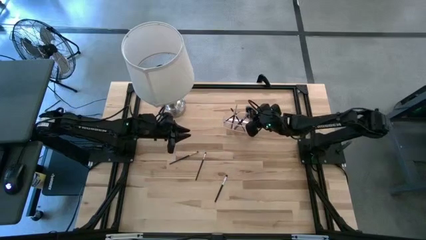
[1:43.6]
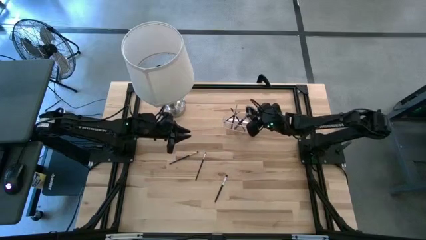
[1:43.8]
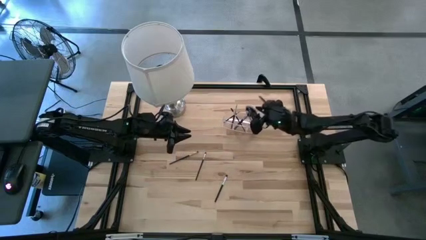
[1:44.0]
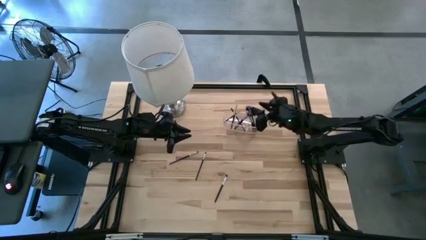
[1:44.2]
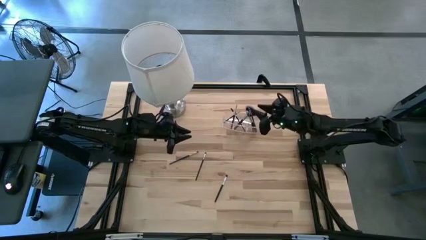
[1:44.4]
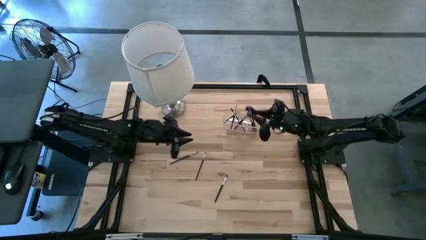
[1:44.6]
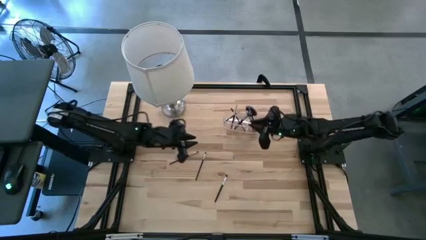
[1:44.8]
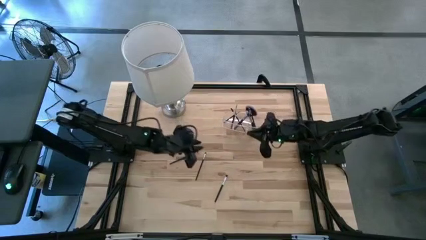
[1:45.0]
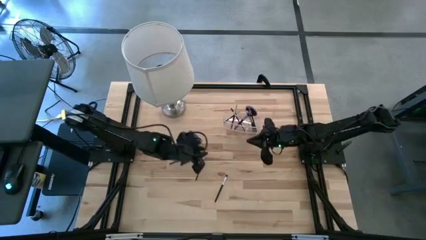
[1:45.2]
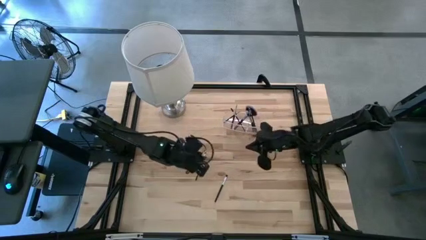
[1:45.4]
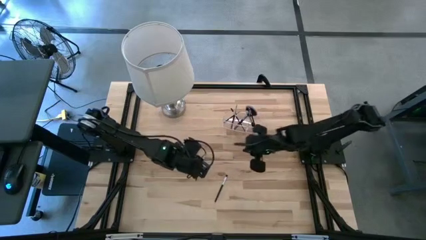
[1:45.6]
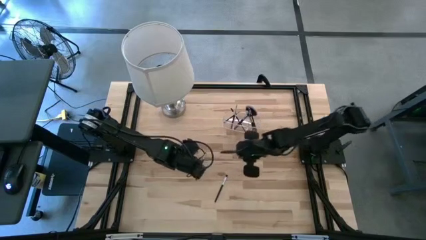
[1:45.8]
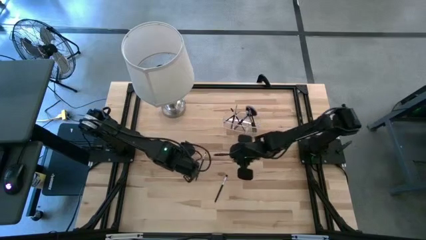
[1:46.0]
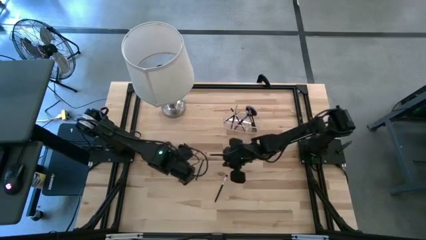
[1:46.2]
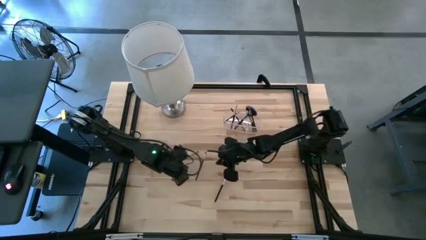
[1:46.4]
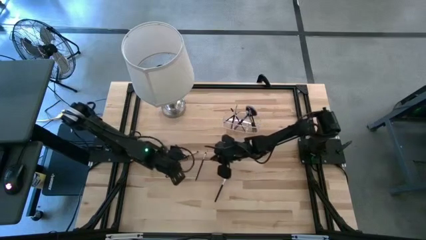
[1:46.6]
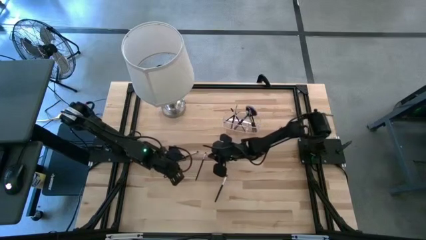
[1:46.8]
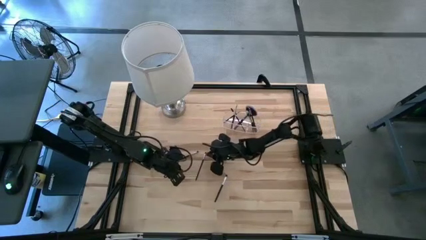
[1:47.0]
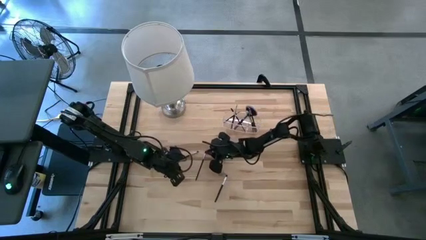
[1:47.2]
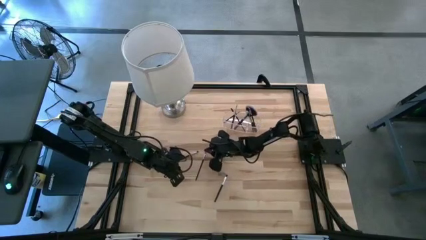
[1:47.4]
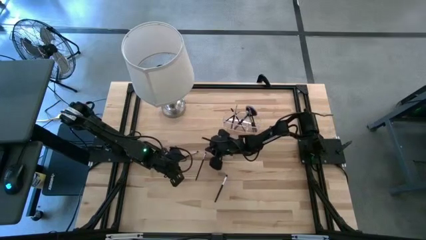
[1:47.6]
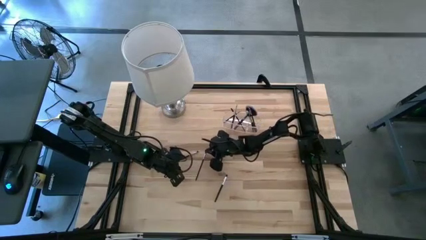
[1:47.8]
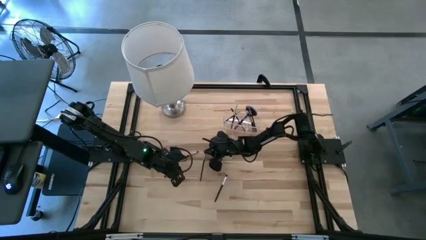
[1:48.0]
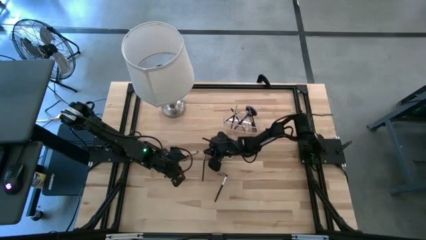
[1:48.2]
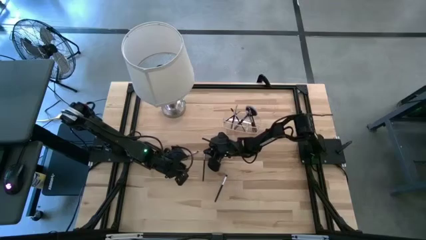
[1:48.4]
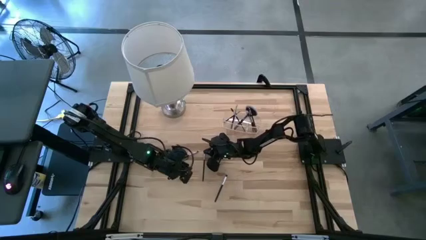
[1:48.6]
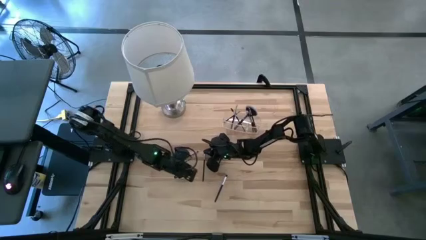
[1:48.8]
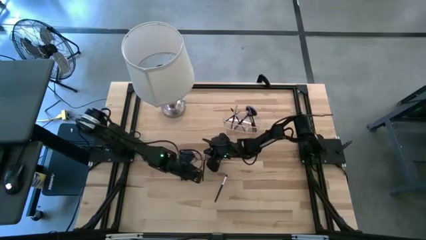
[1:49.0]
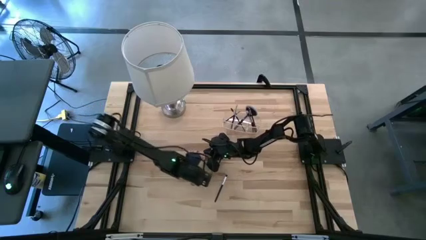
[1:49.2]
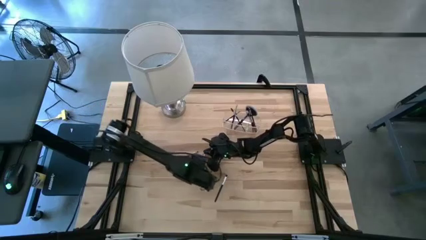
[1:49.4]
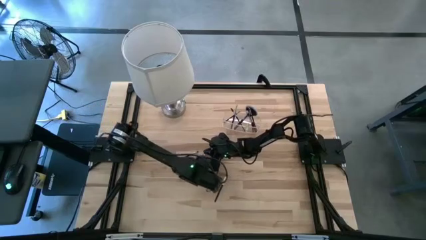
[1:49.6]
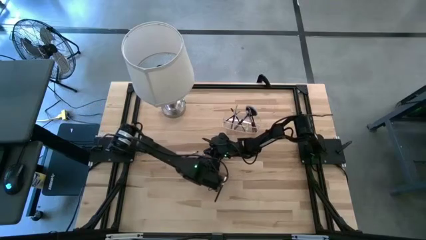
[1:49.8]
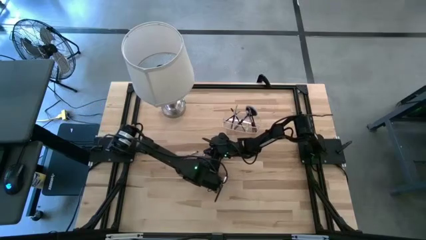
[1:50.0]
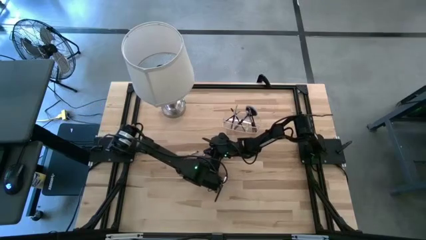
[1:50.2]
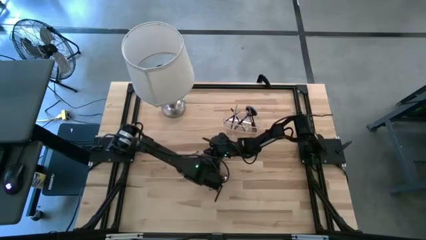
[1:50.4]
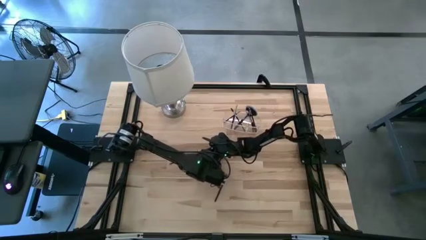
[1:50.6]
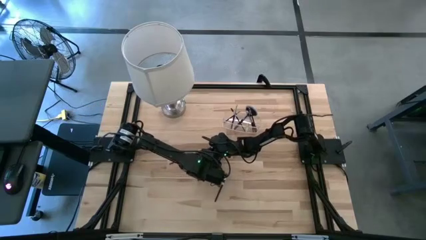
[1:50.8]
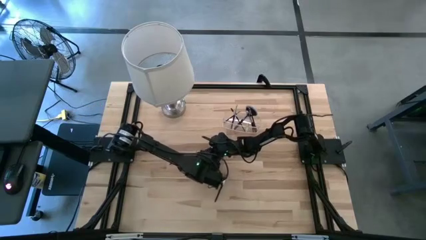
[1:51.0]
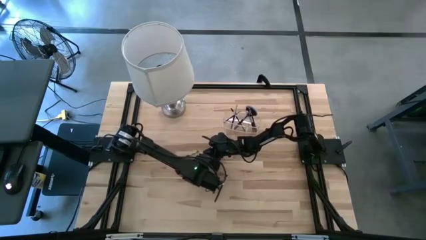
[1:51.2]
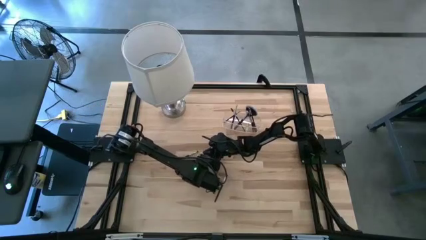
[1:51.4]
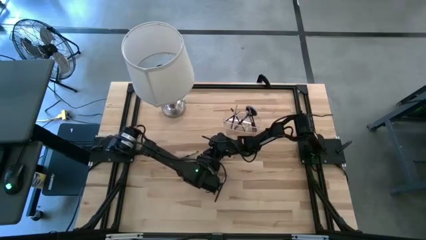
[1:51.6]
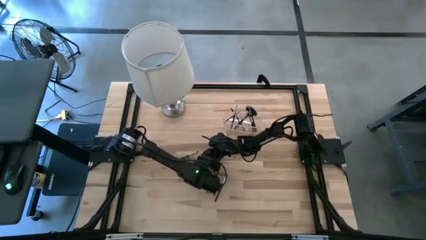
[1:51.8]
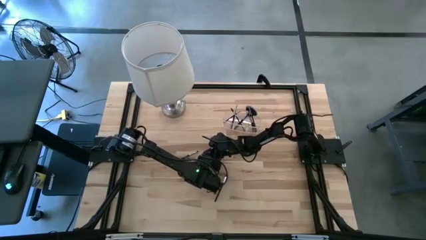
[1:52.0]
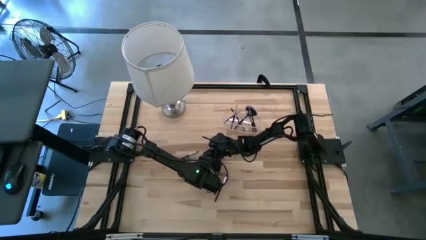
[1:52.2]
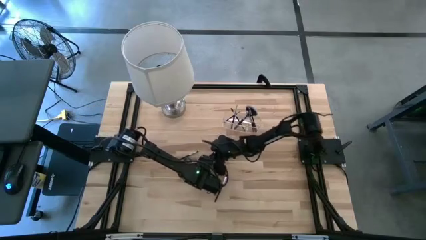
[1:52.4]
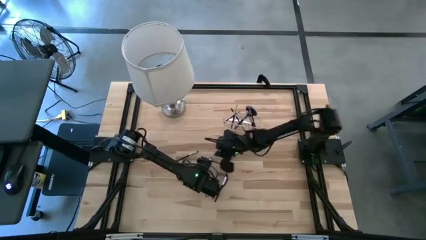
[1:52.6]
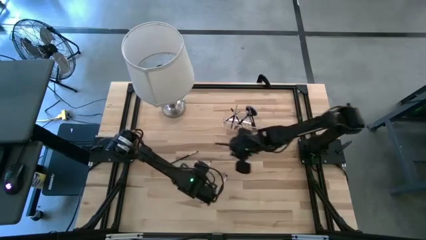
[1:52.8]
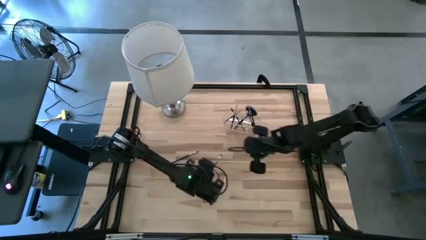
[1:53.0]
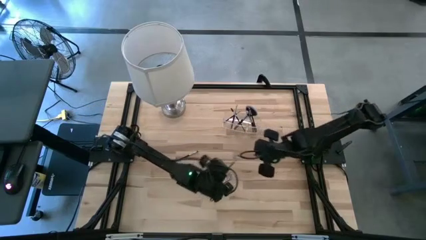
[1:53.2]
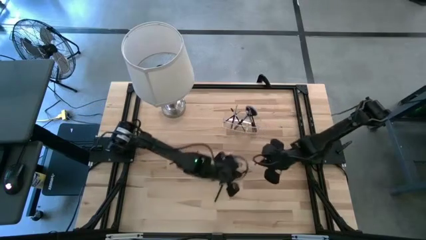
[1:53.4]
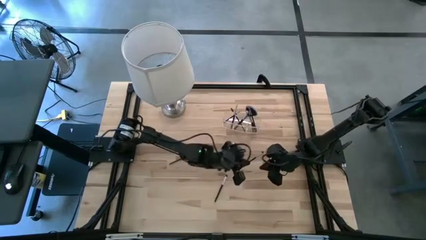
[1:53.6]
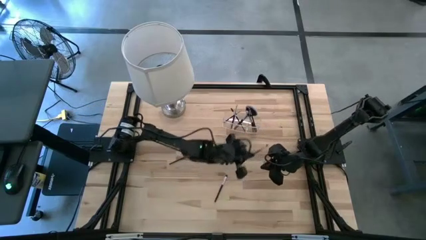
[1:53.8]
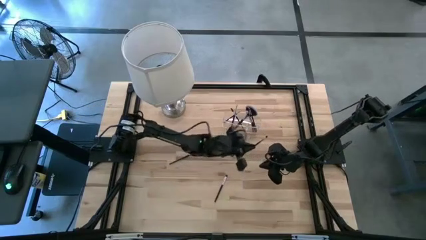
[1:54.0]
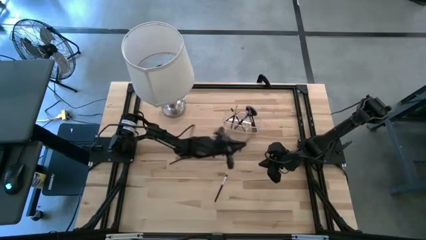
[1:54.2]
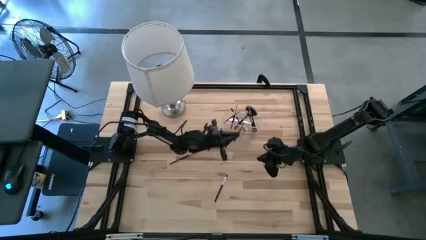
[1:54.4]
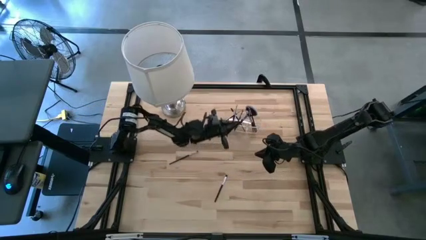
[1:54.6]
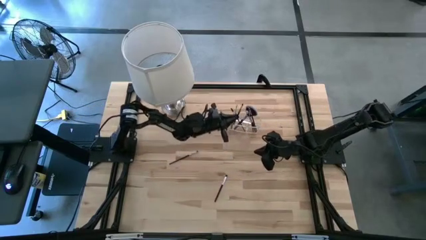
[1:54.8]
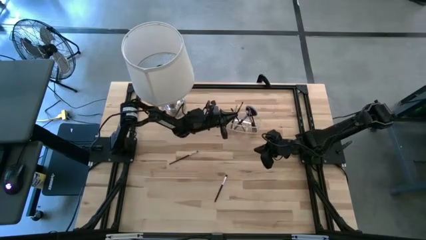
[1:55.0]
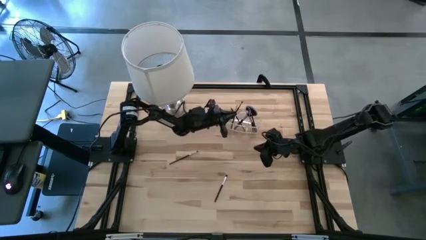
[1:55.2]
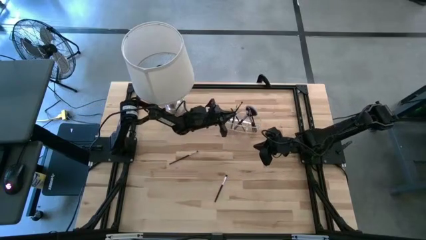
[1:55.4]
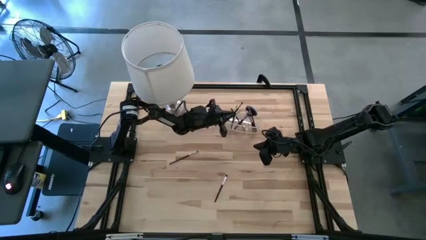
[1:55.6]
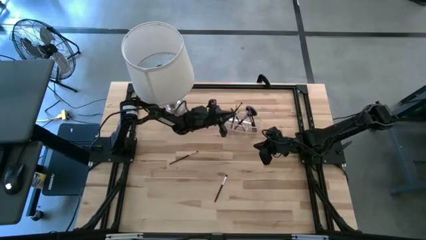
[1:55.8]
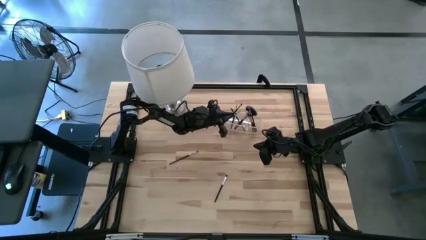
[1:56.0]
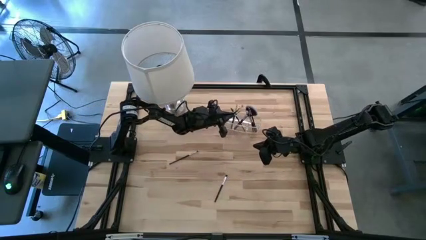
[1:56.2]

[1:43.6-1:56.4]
Task: Pick & Place Makeup Supplies
Put the makeup brush into the transparent organizer
